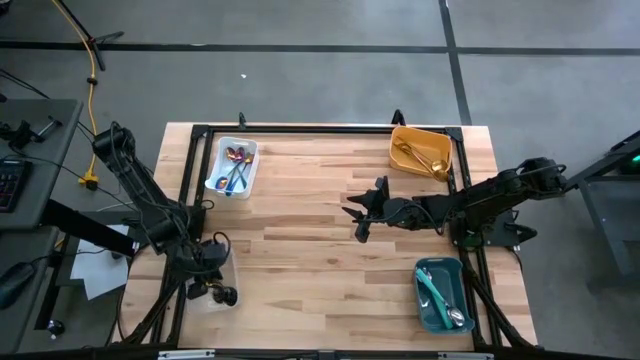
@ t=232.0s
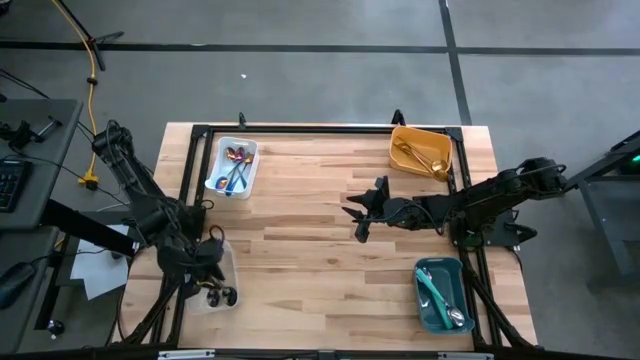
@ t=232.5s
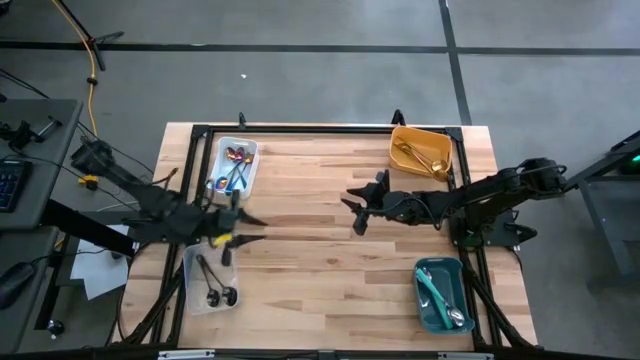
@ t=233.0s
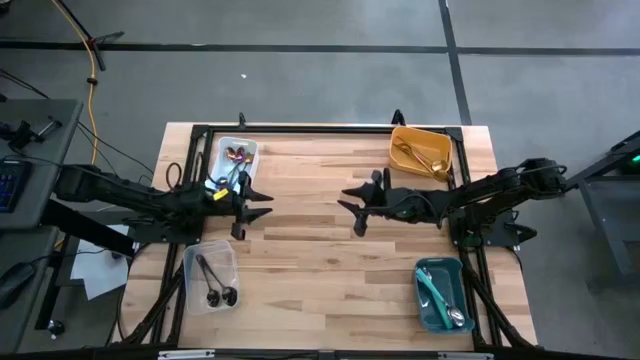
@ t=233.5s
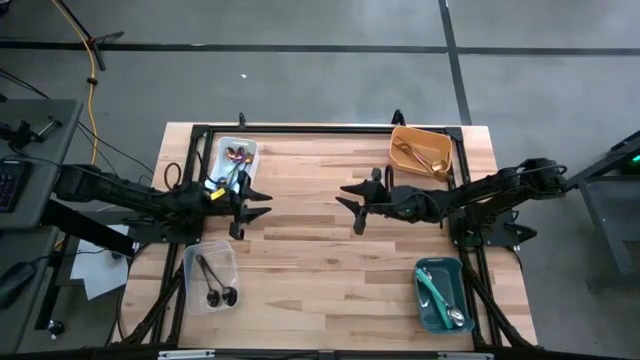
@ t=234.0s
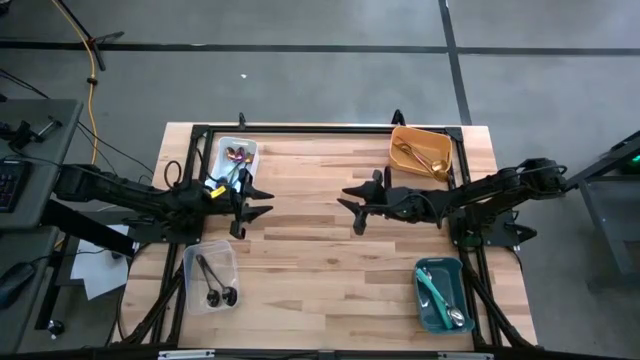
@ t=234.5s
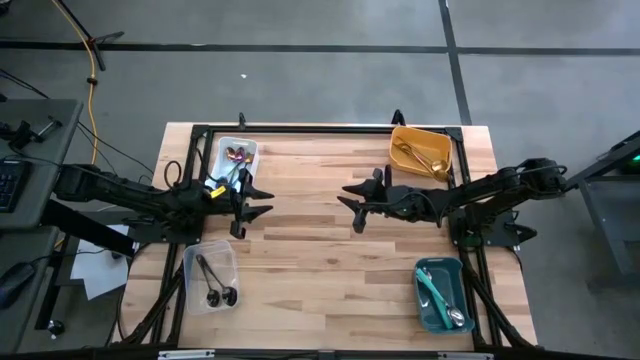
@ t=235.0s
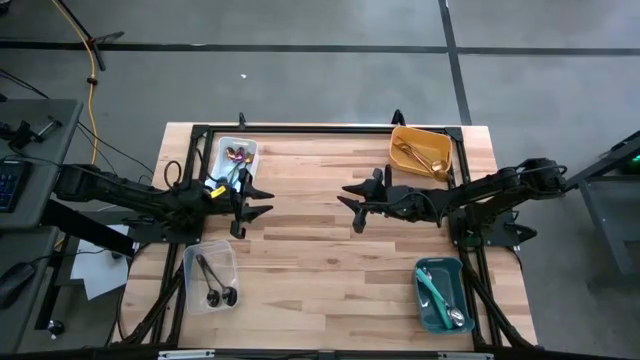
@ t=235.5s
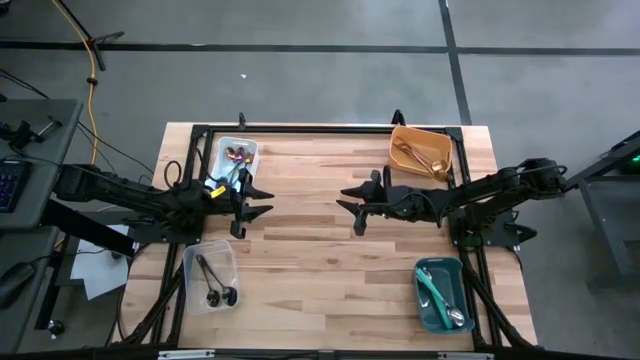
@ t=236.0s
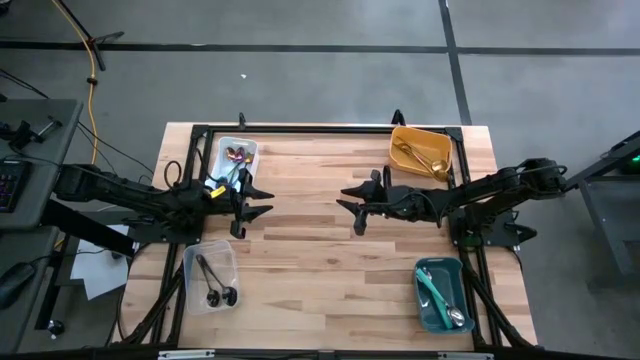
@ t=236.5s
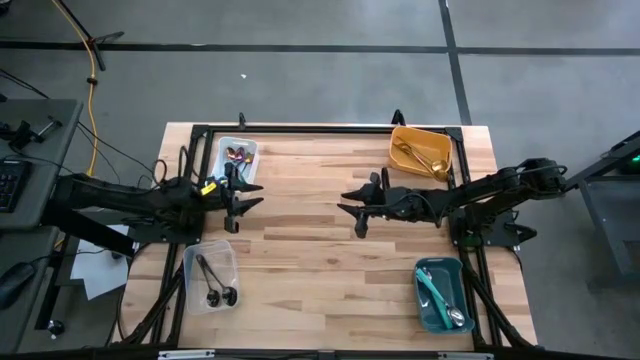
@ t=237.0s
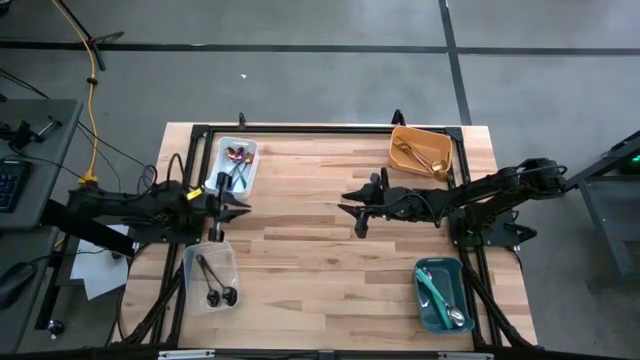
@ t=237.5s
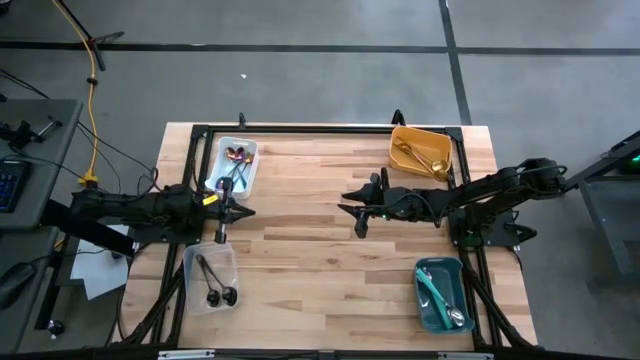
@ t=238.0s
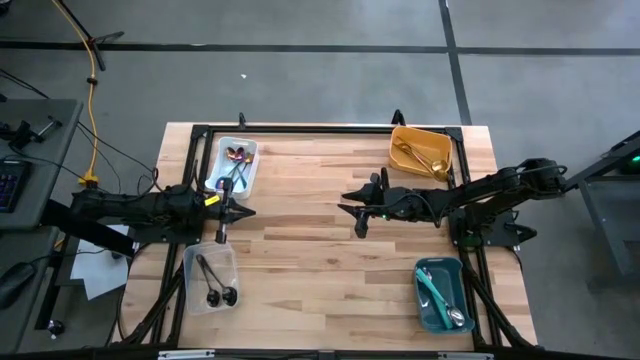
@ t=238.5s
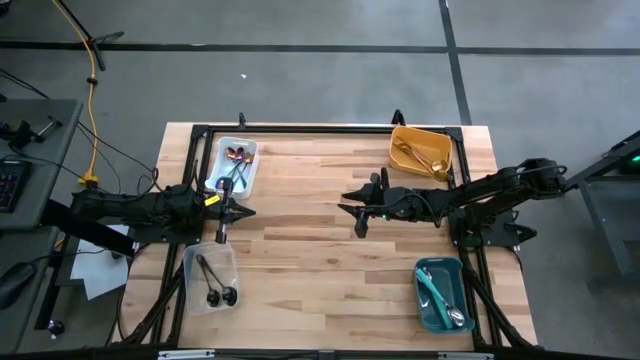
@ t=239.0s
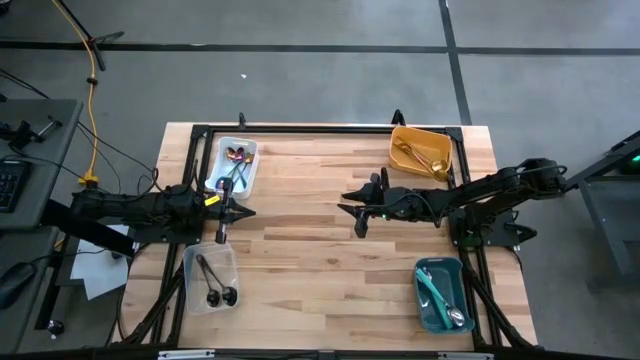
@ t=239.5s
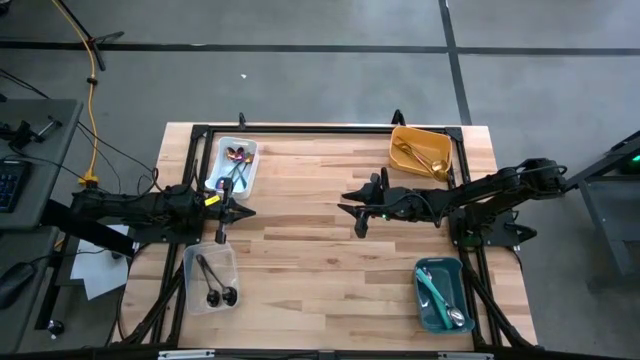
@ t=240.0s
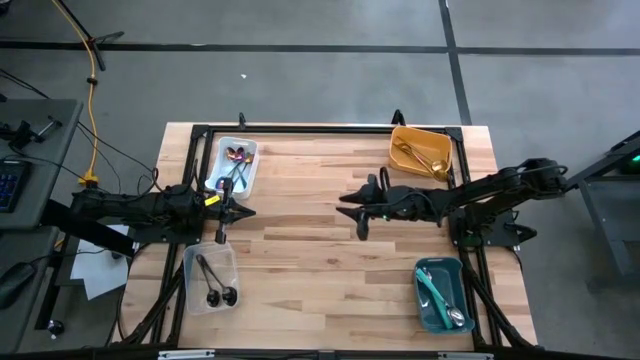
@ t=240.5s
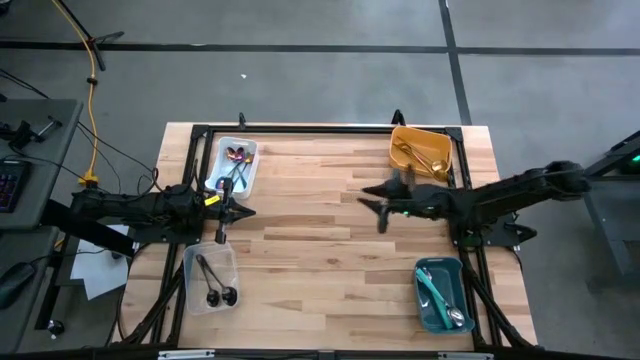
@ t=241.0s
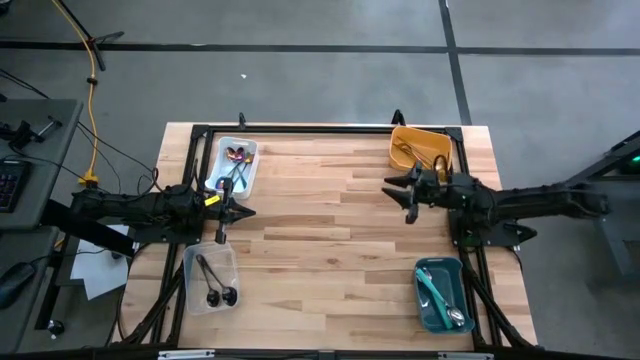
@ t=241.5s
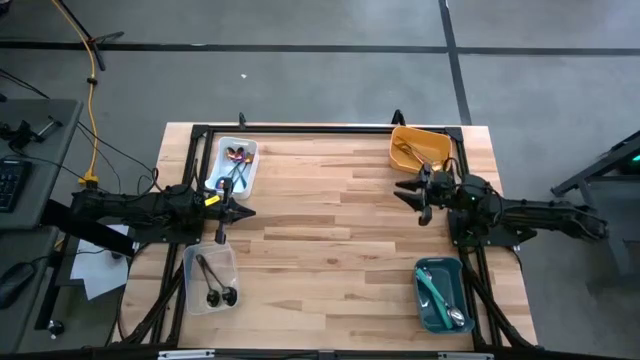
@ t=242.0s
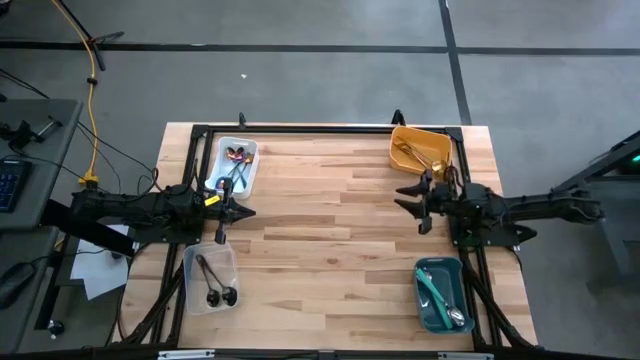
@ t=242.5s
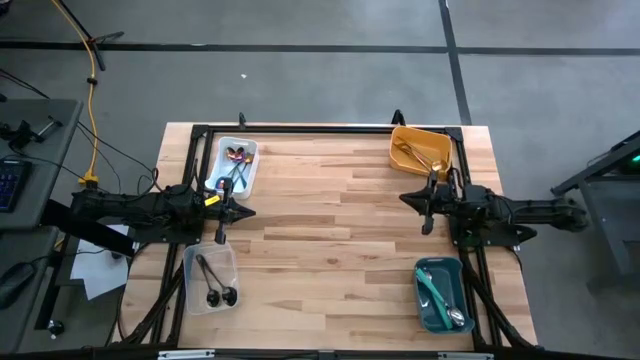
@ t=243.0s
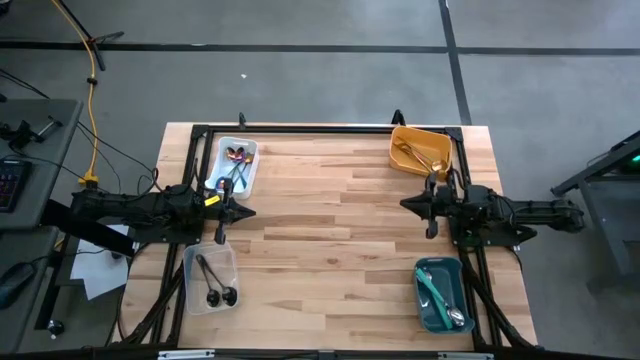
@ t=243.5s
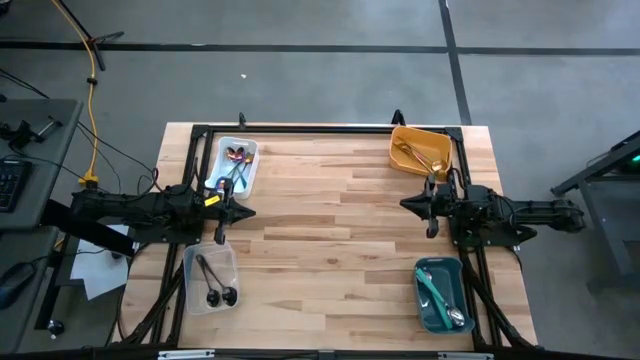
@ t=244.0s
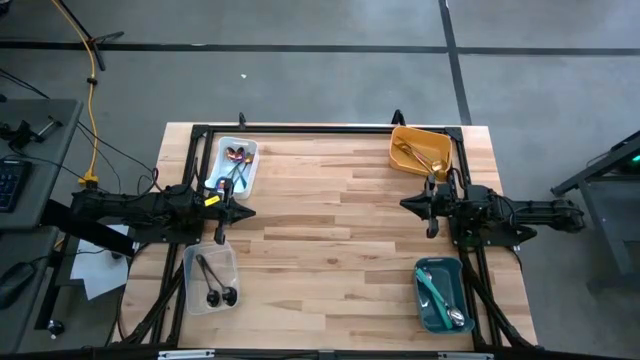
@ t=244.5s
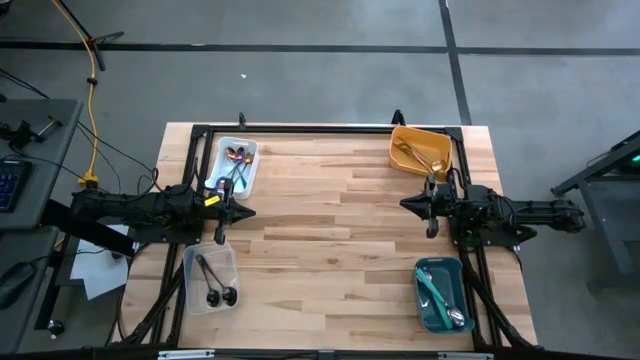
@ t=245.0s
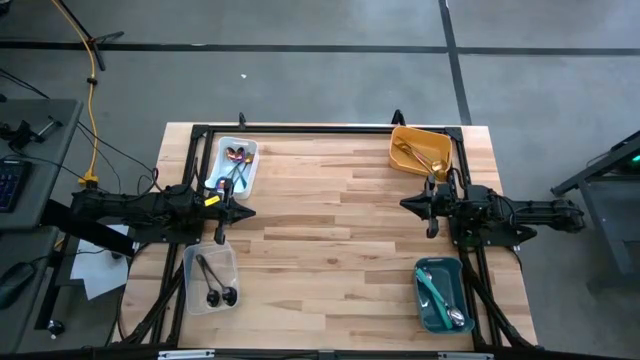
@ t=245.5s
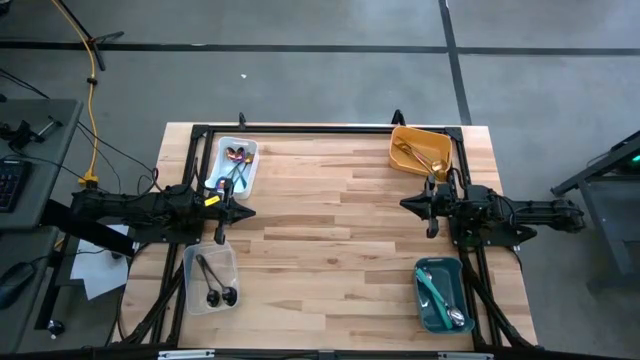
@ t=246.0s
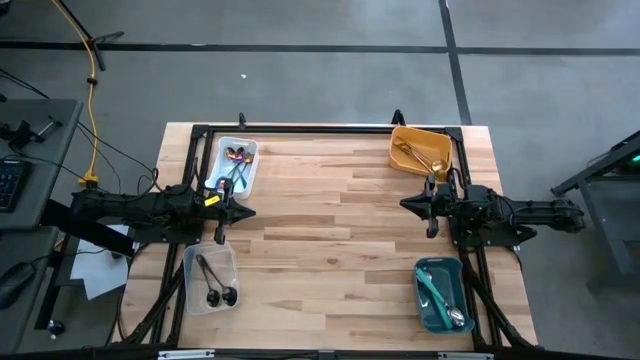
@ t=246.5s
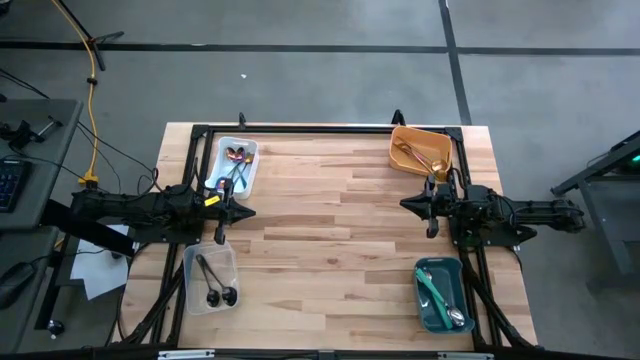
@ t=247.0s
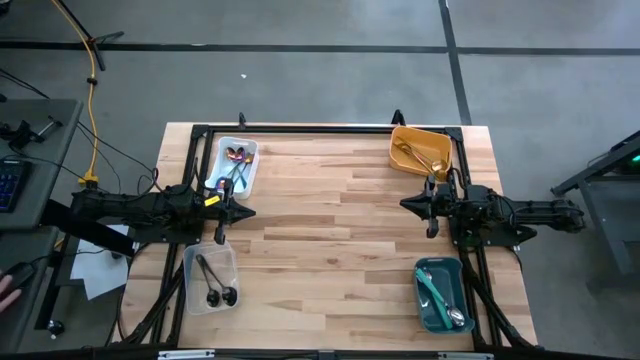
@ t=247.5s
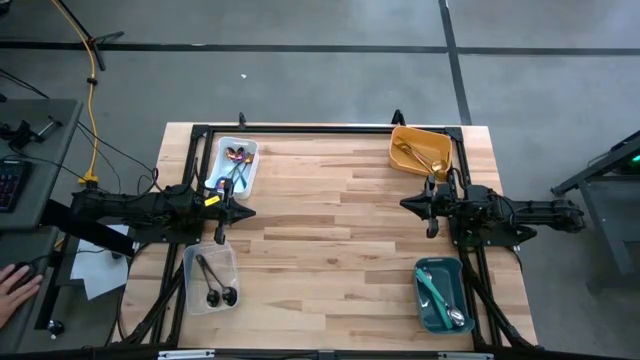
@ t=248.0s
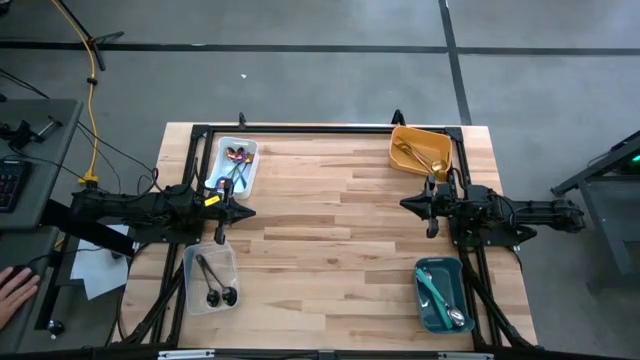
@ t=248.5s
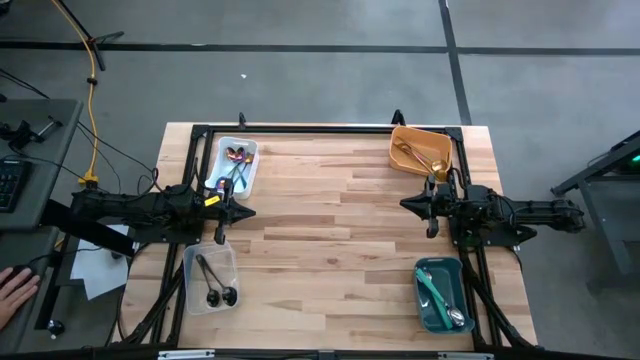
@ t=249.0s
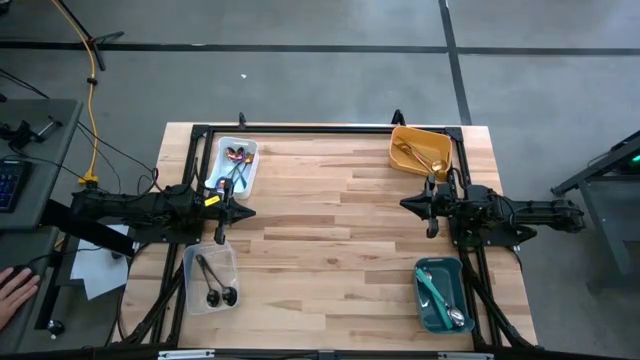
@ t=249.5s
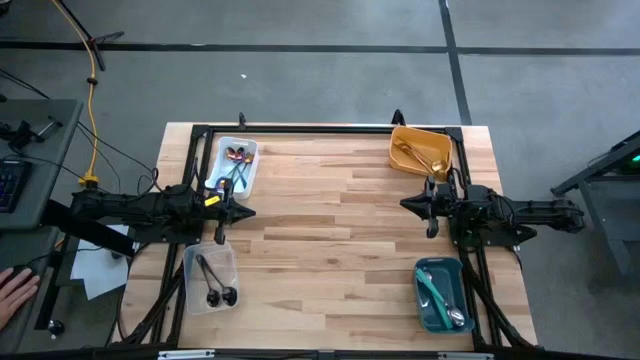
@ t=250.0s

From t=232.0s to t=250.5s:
Task: Sort silverware by color (type)
Return to Home Position

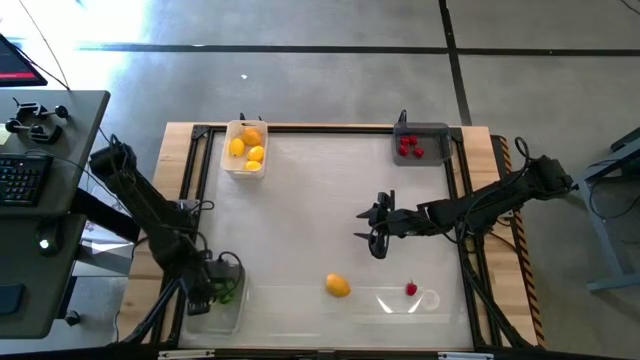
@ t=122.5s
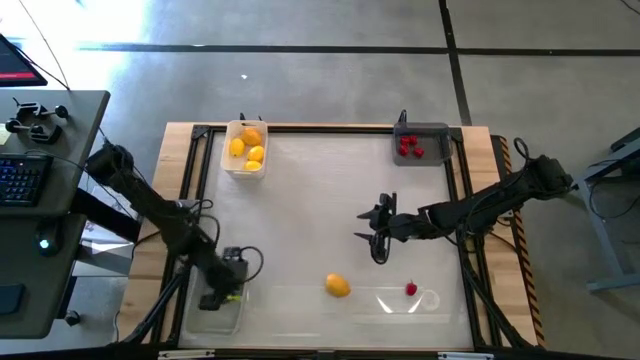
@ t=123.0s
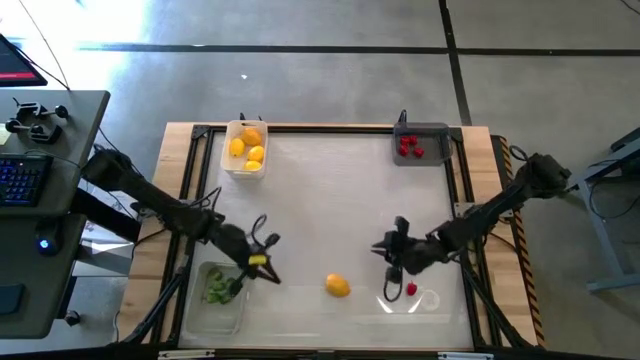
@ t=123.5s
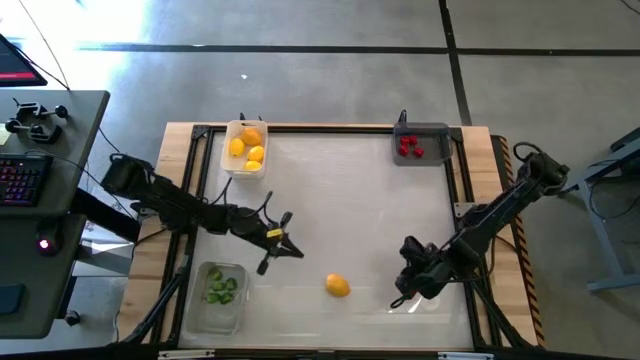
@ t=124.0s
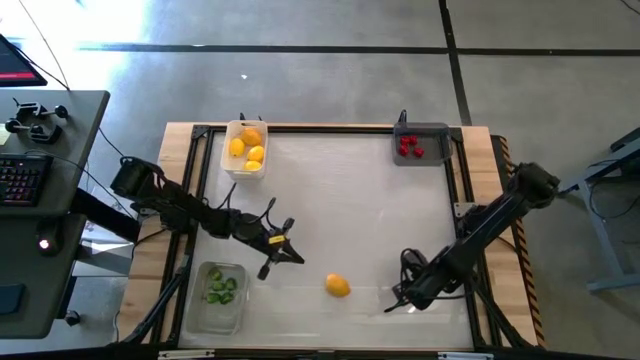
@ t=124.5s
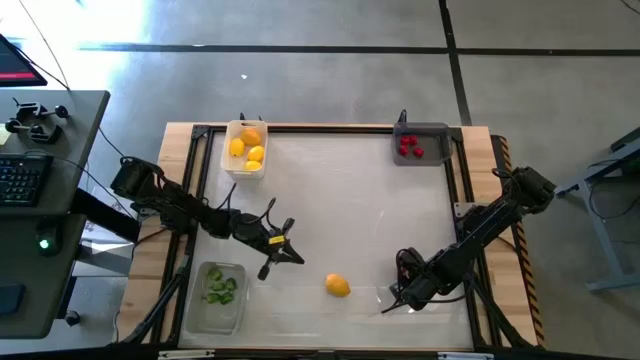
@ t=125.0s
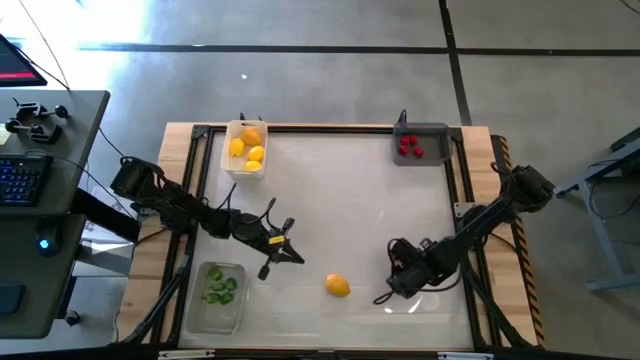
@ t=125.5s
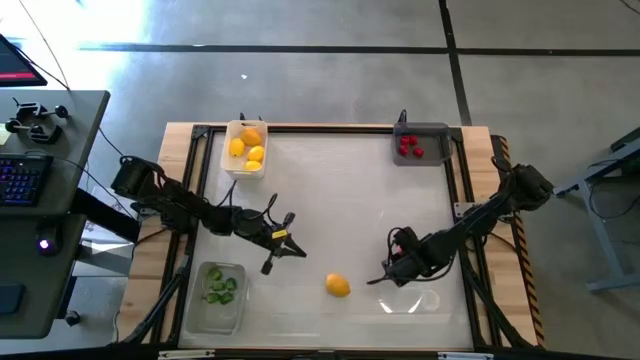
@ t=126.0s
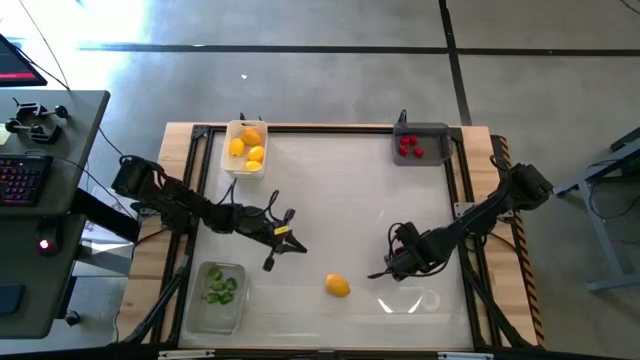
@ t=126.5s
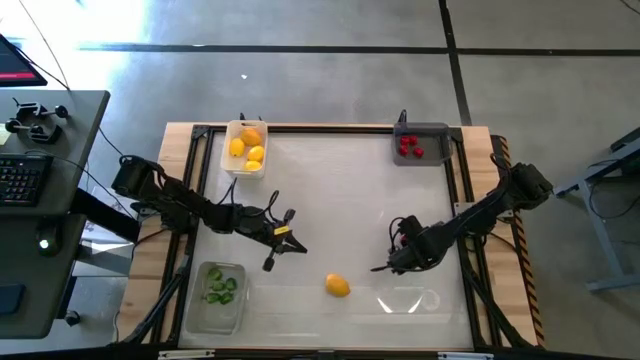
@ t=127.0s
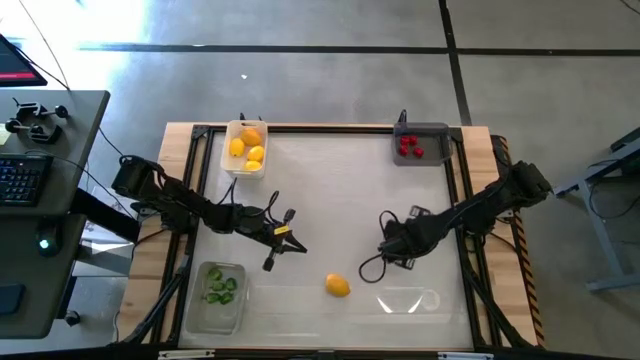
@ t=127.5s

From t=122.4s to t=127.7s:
Task: Sort produce into baskets
Put the red bell pepper into the black bin
